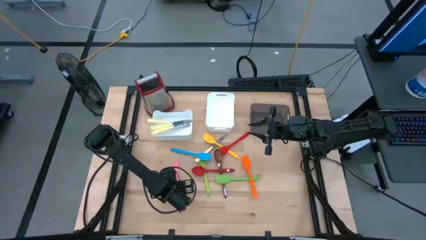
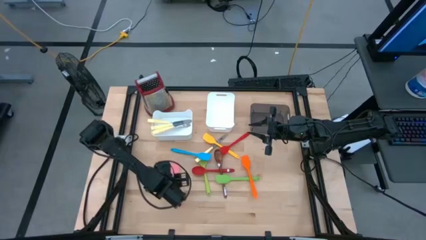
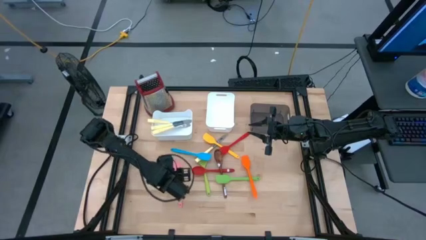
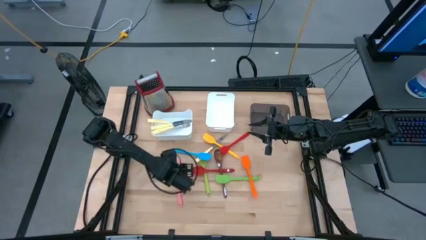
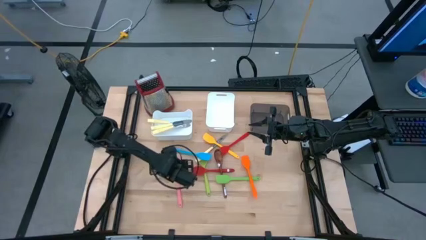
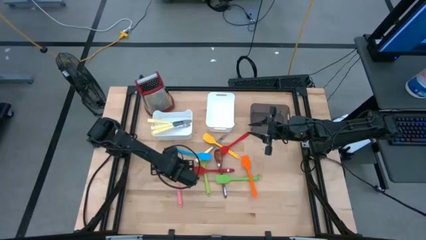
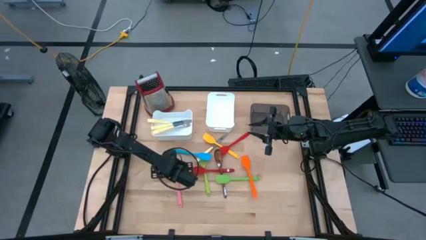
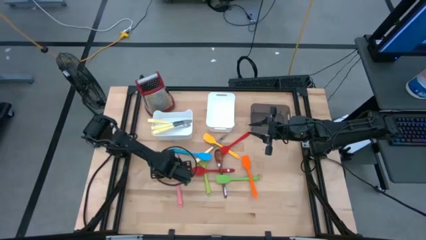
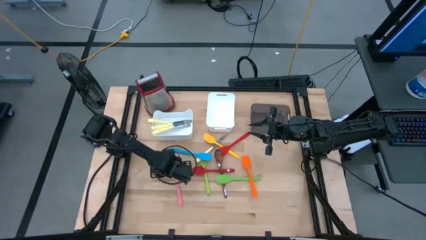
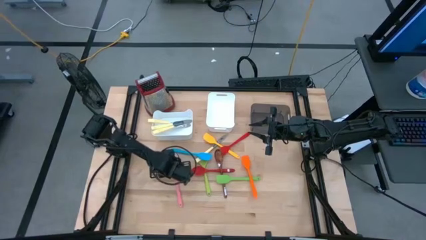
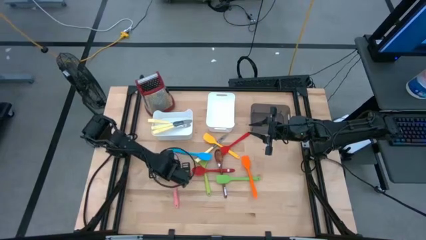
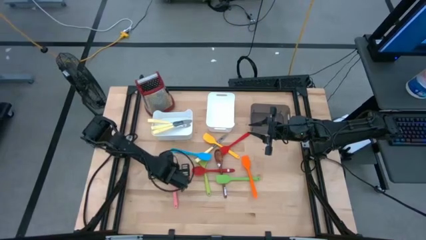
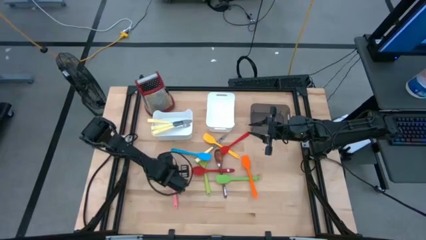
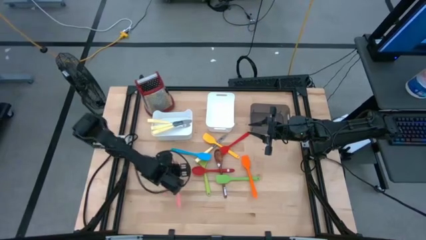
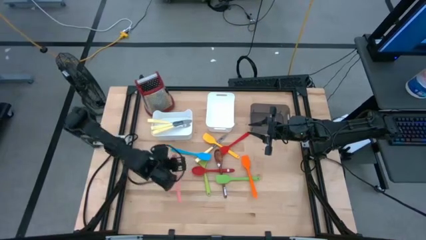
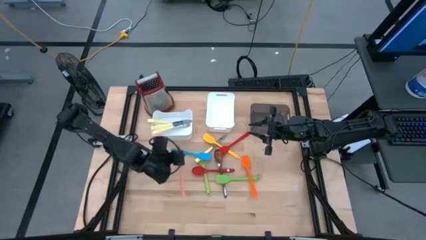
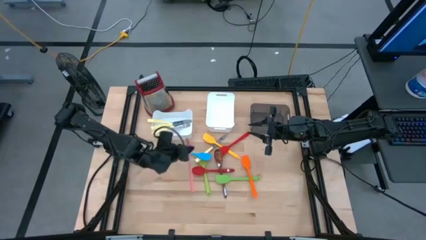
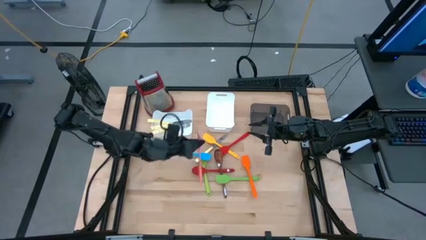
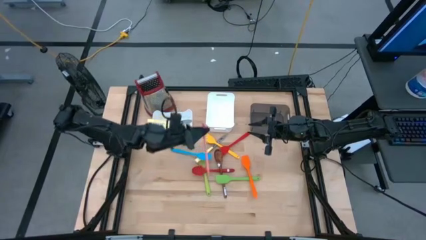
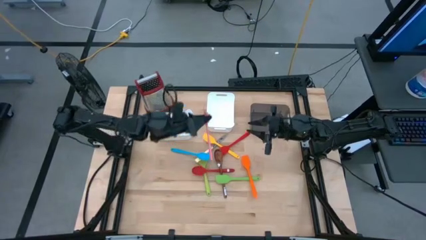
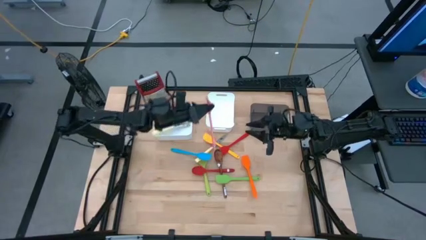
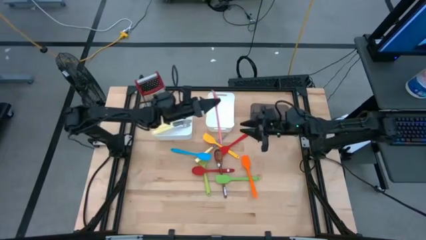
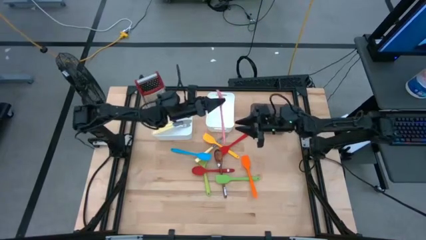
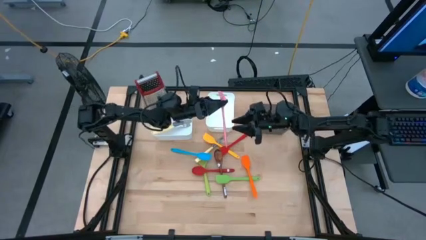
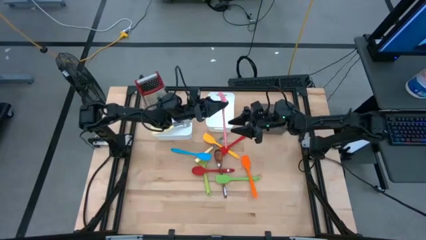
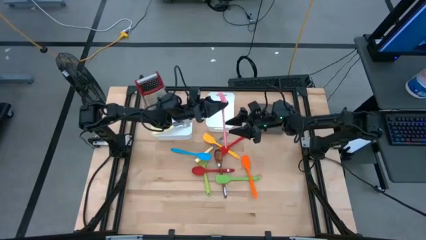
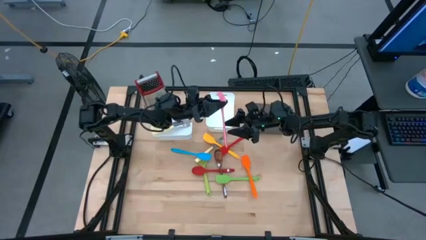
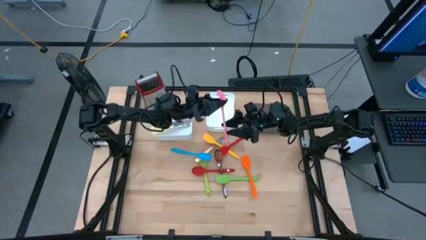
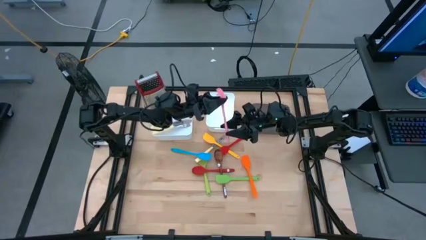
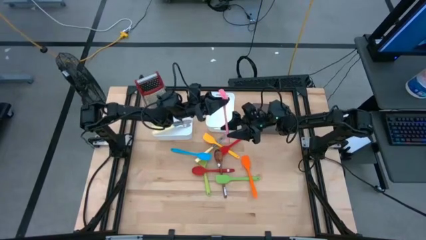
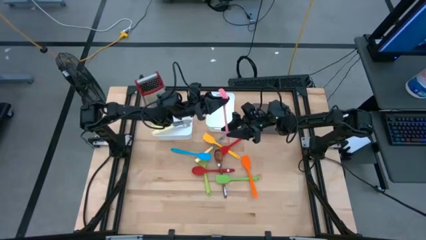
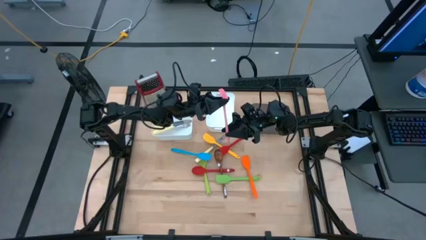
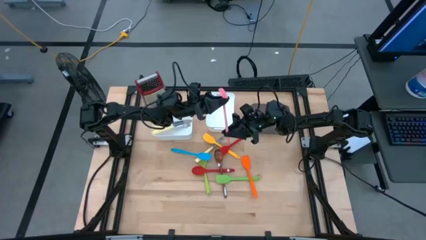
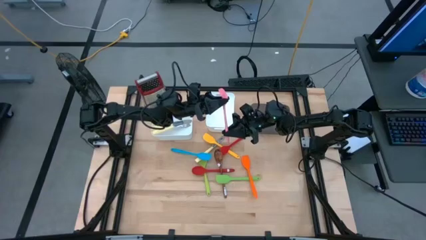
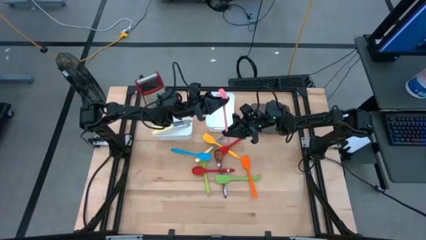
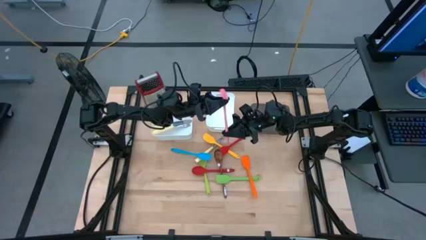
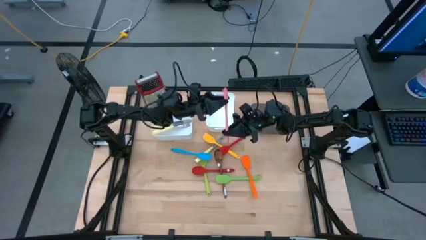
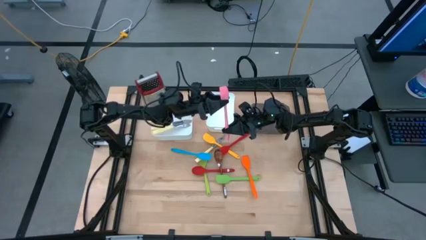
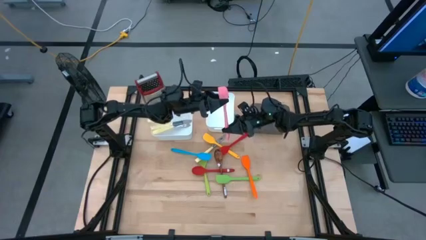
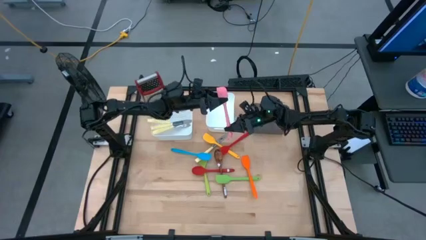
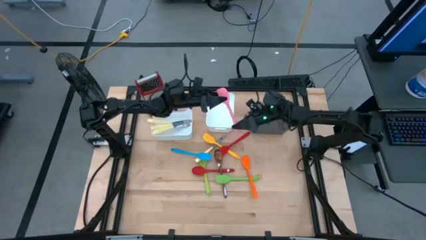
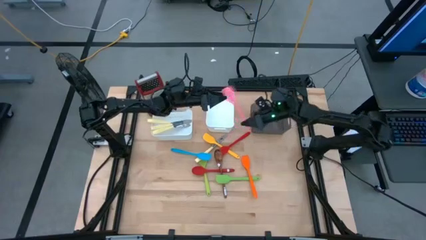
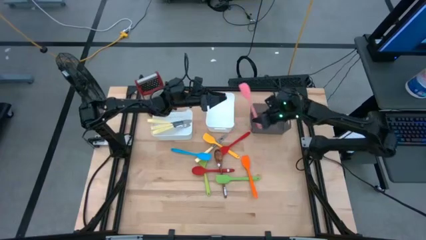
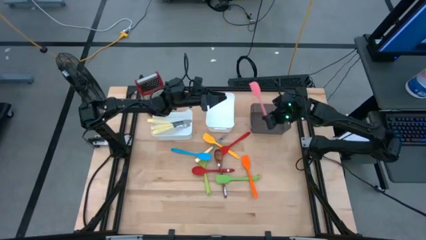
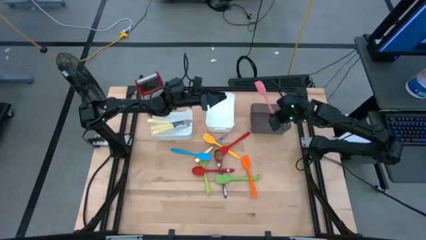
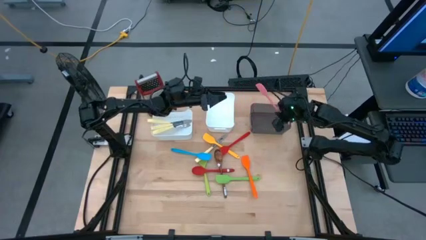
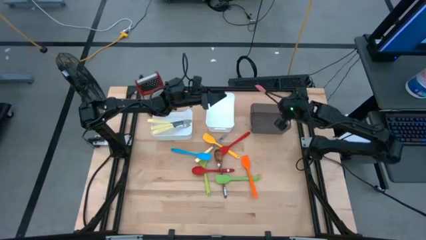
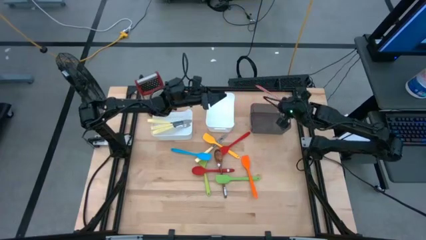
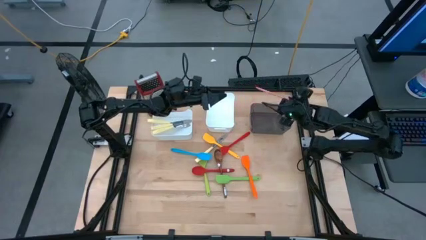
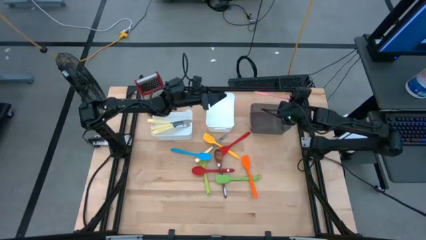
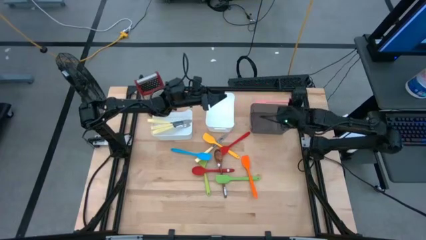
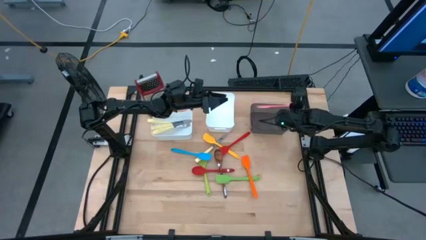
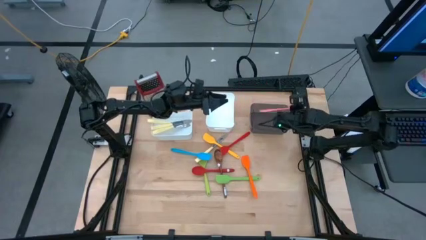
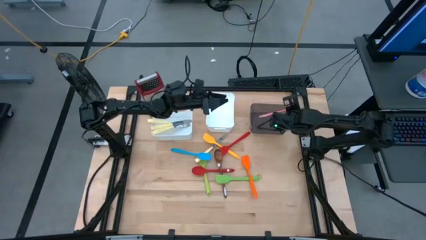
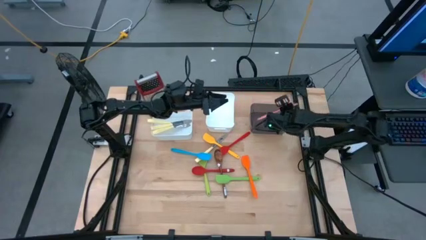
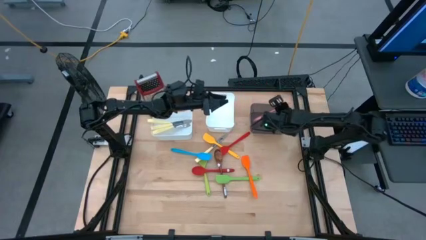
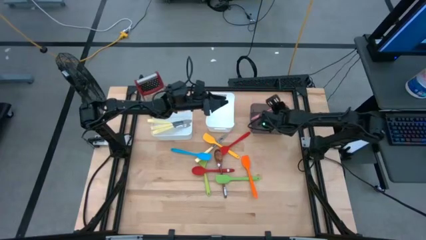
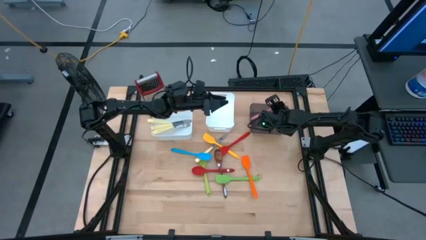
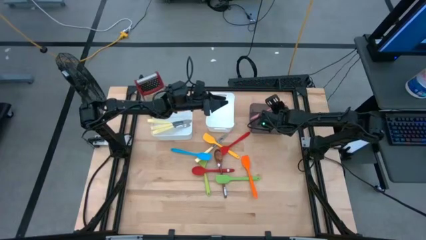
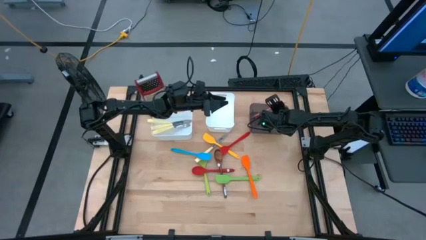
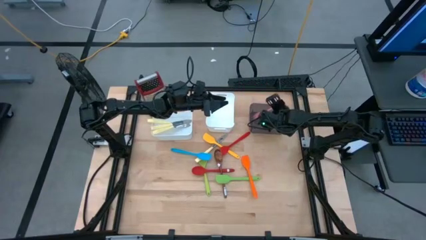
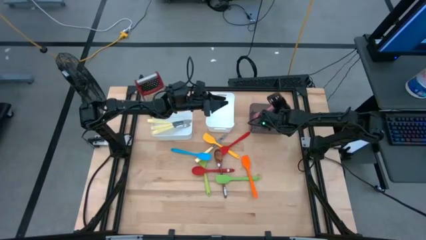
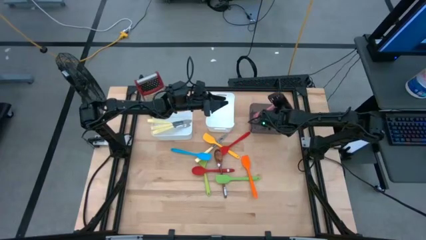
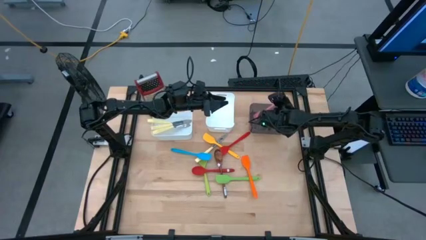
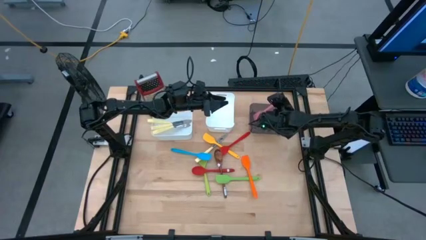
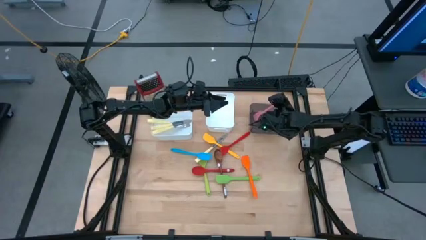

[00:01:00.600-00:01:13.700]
Task: Pick & Place Kitchen Items
Put the pink spatula into the black bin
